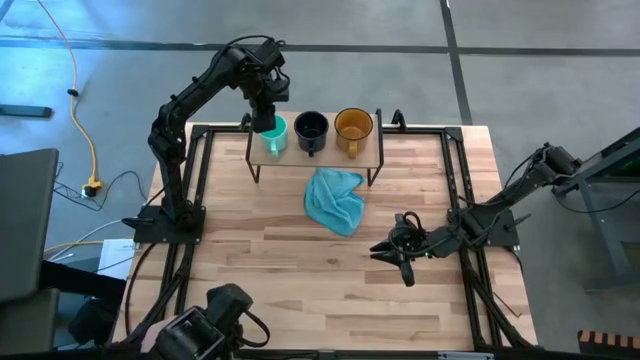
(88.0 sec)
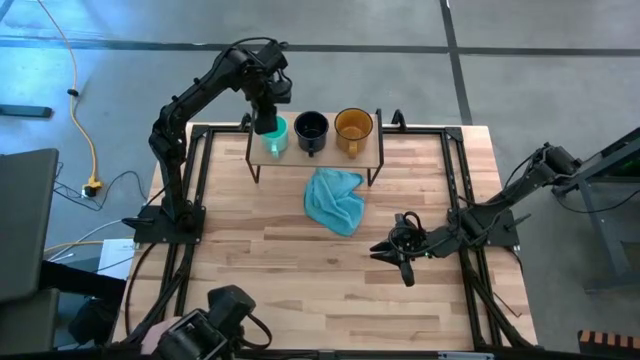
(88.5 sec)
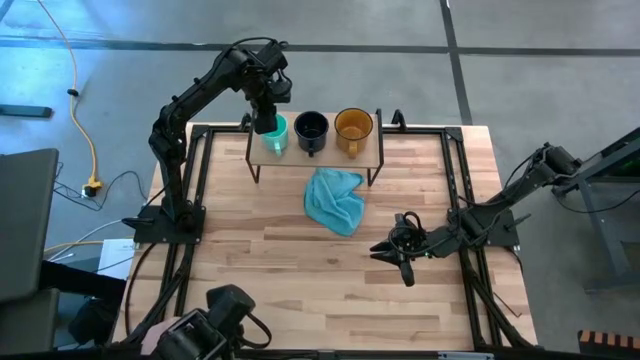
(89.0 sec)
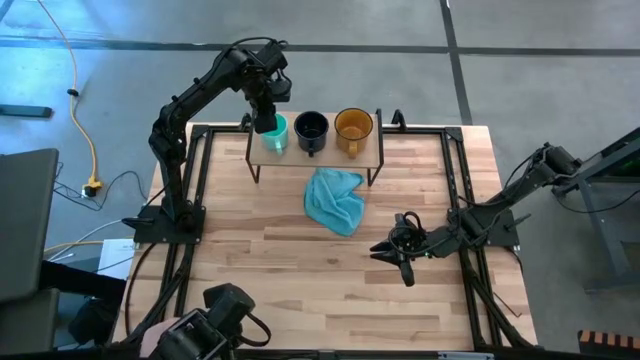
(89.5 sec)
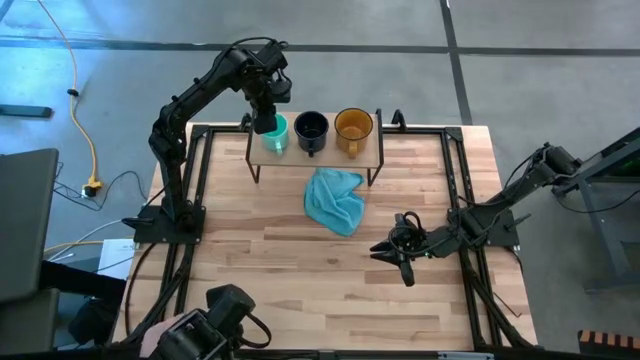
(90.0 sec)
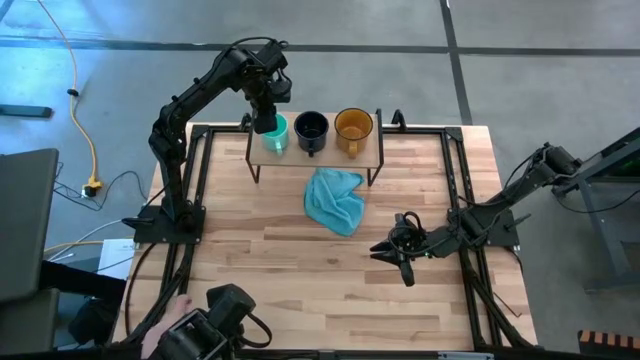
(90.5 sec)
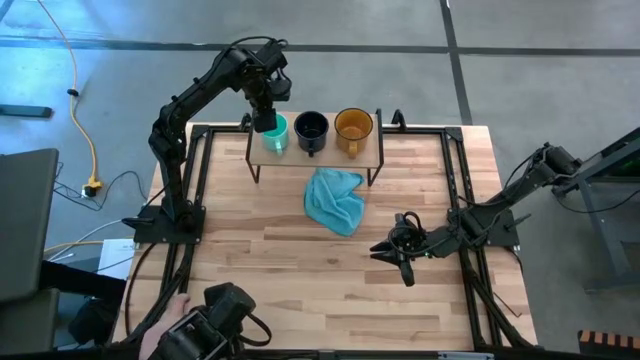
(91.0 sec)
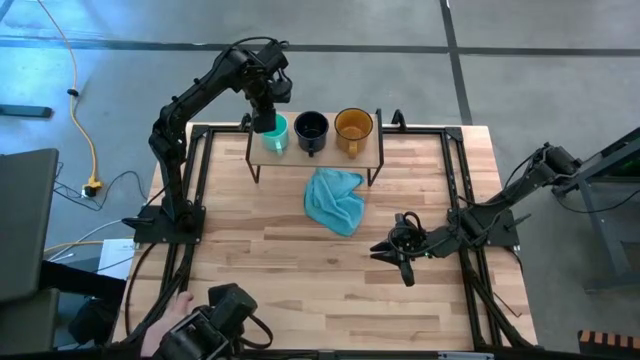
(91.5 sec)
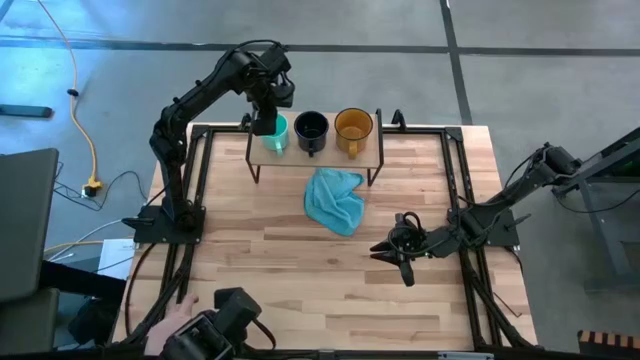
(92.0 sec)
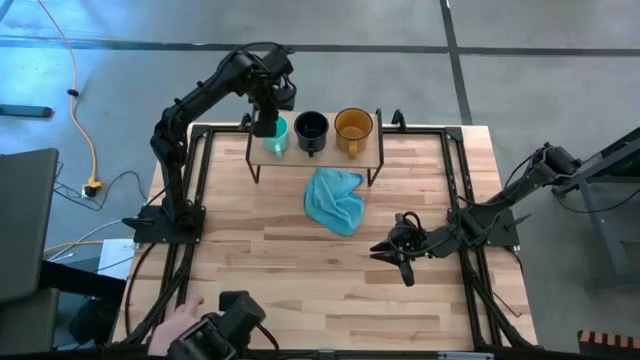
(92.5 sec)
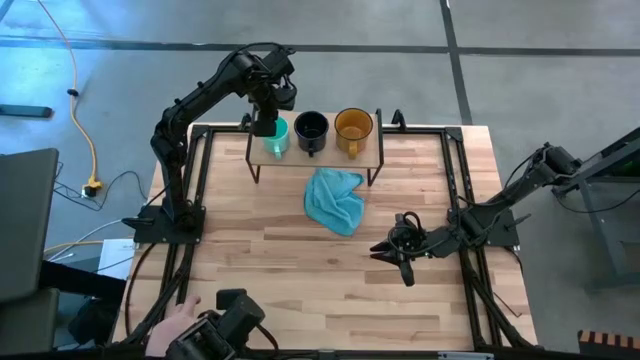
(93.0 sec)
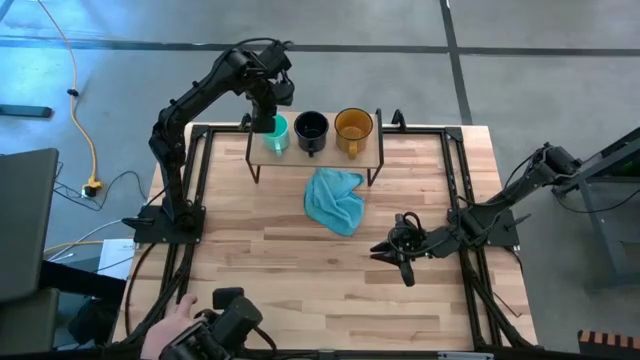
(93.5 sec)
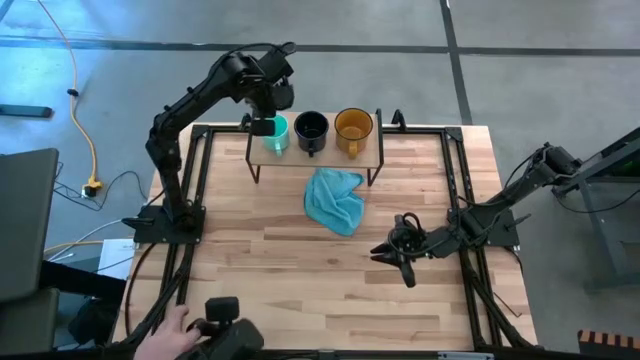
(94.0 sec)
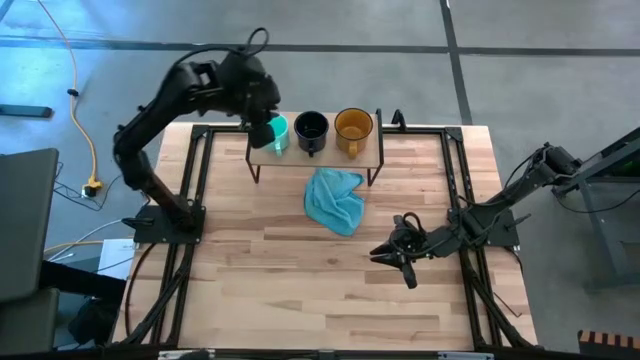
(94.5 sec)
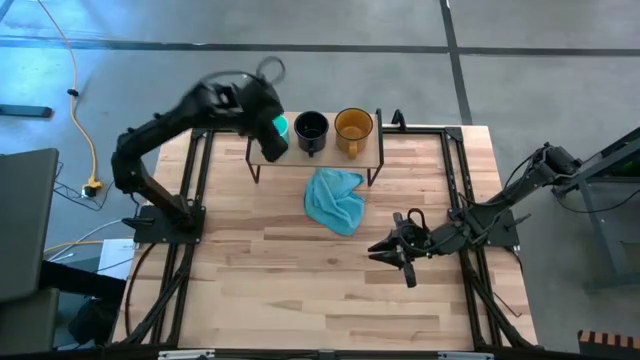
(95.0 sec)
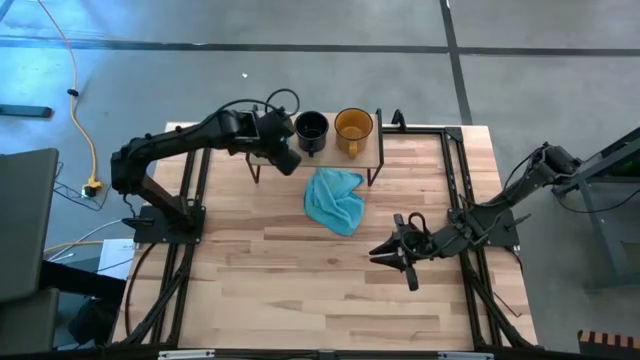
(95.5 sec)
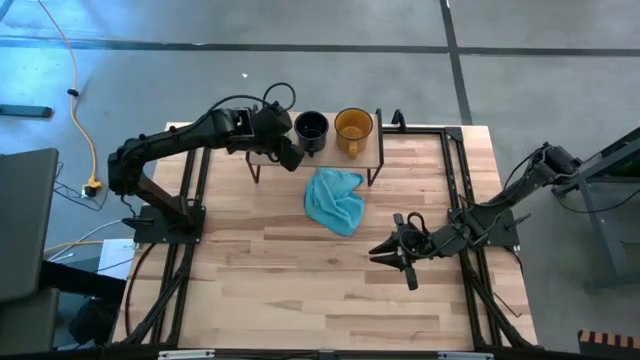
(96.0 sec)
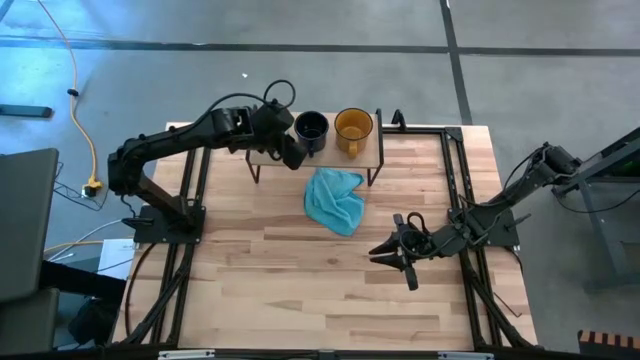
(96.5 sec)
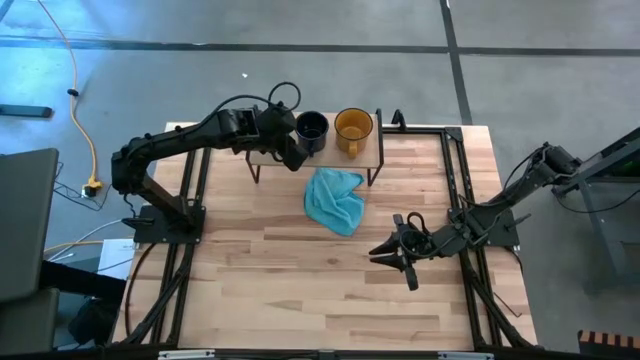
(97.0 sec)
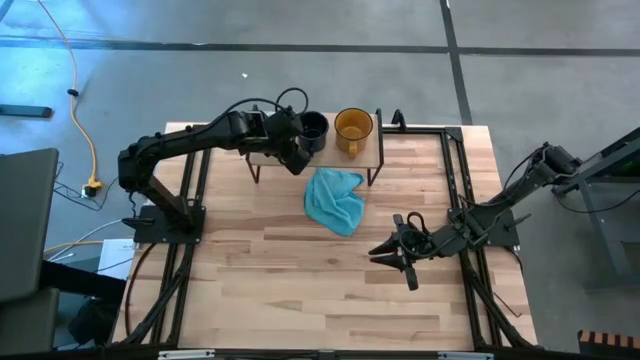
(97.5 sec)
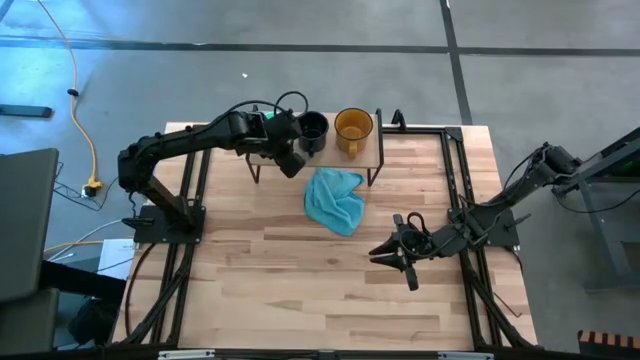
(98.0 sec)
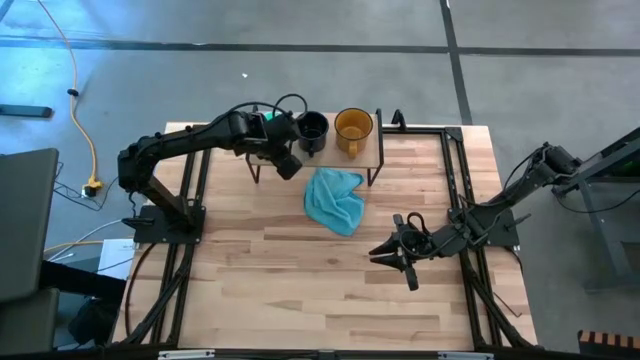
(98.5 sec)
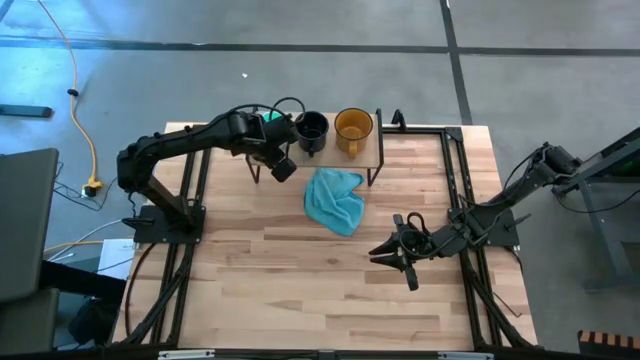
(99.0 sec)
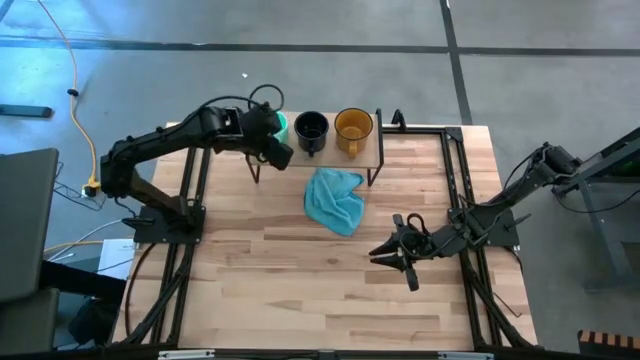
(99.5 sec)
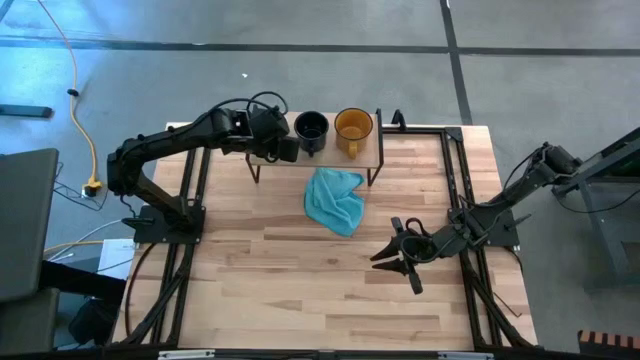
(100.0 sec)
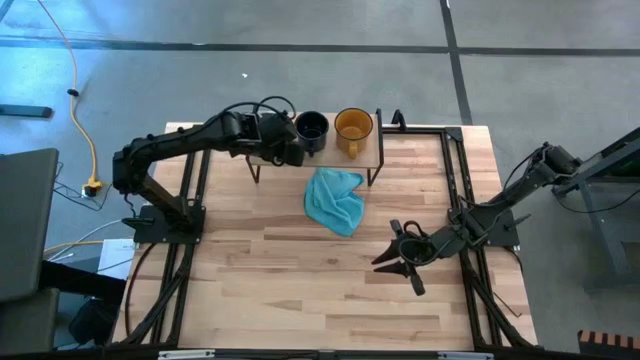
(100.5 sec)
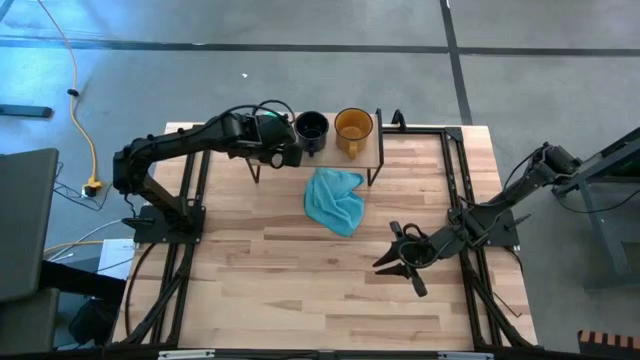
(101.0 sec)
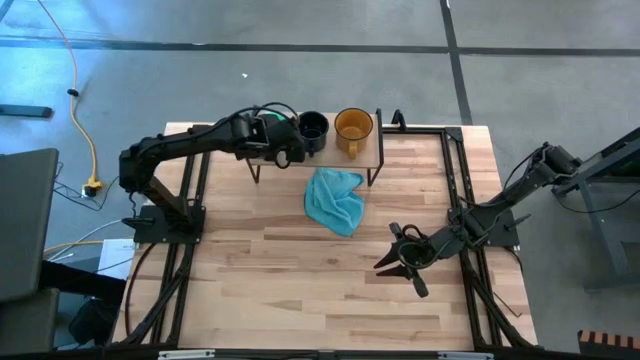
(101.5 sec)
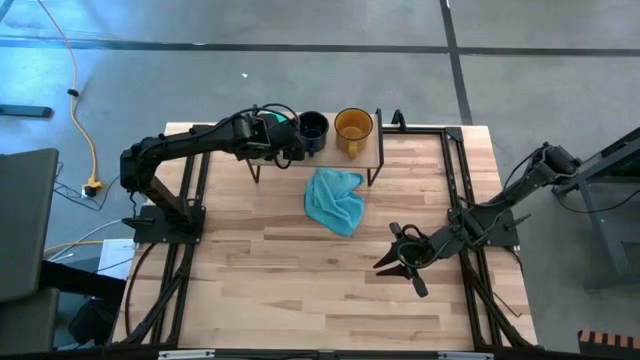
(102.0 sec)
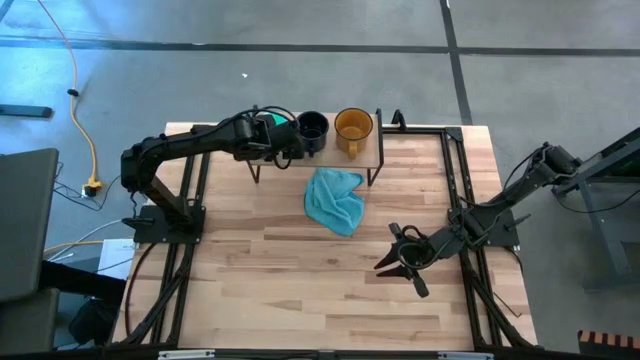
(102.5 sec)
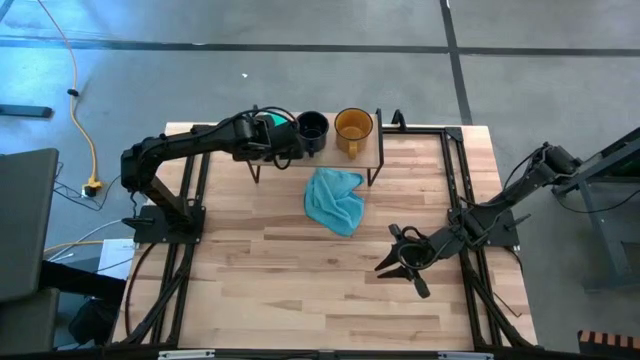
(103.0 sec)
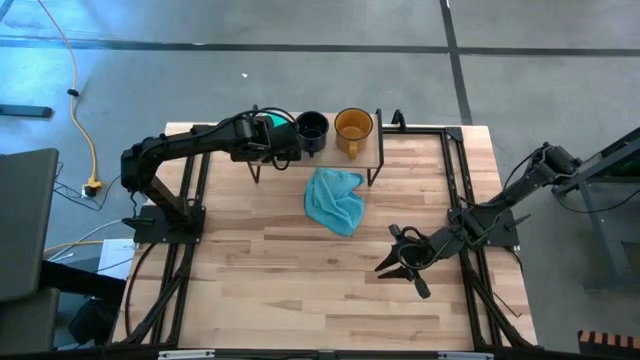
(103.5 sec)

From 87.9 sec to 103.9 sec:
Task: Stack small to large cups/mugs on shelf
Put the light blue mug on the shelf

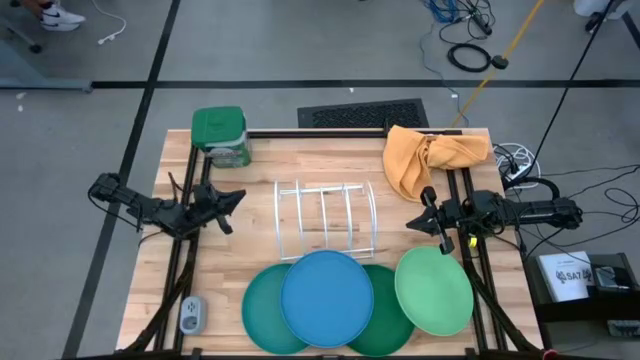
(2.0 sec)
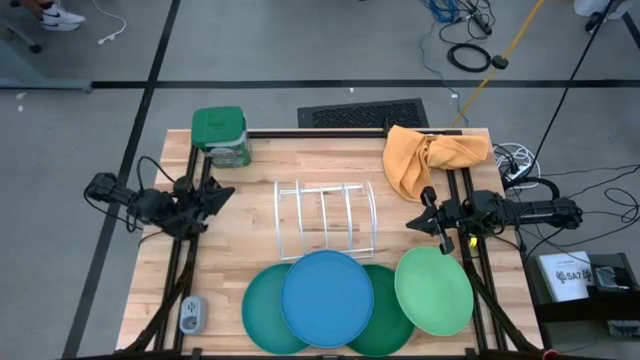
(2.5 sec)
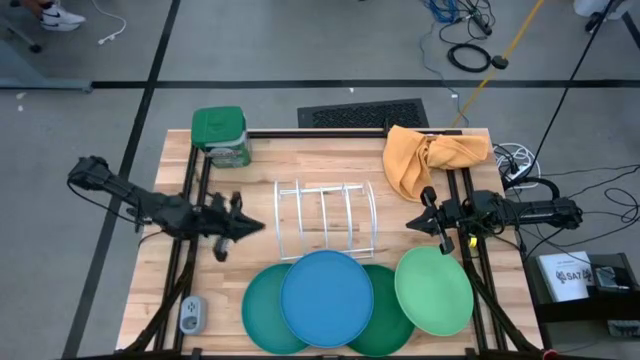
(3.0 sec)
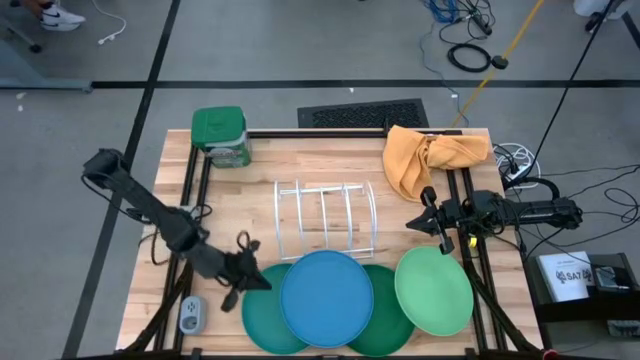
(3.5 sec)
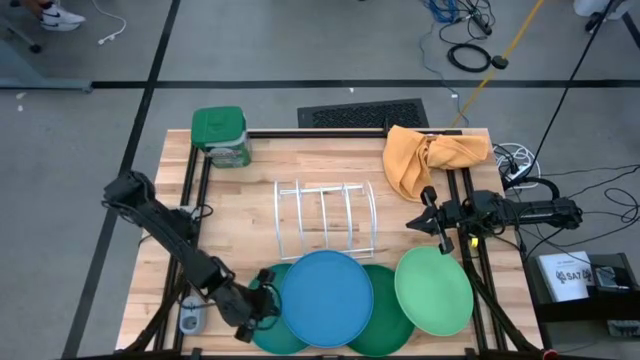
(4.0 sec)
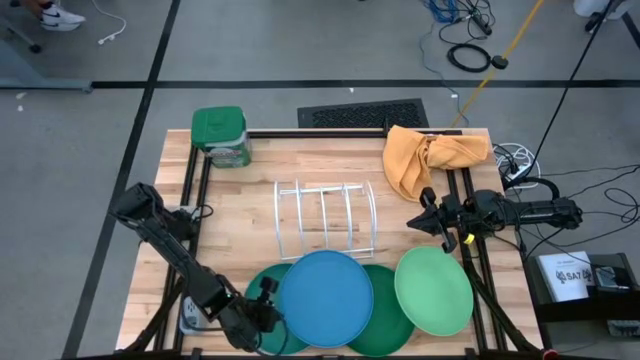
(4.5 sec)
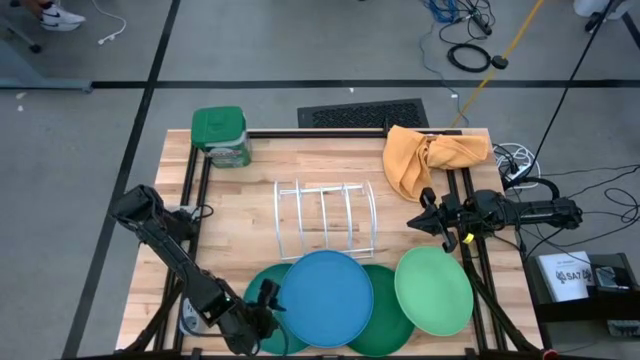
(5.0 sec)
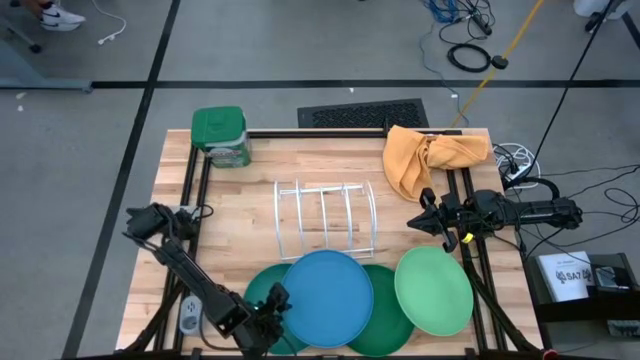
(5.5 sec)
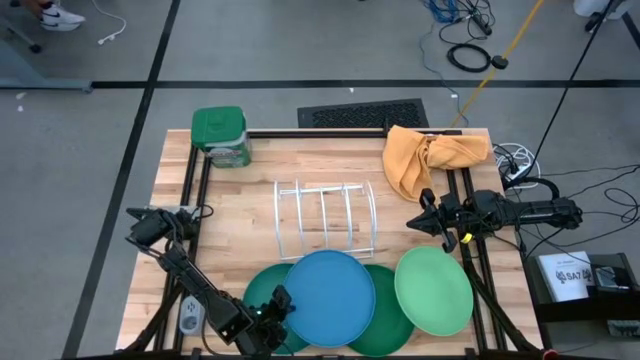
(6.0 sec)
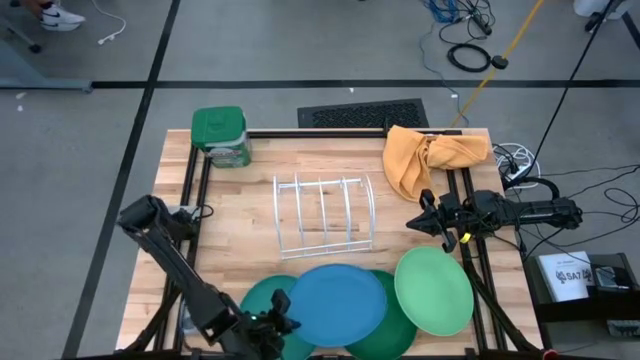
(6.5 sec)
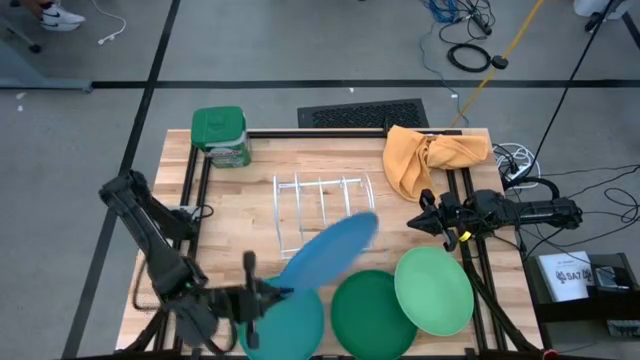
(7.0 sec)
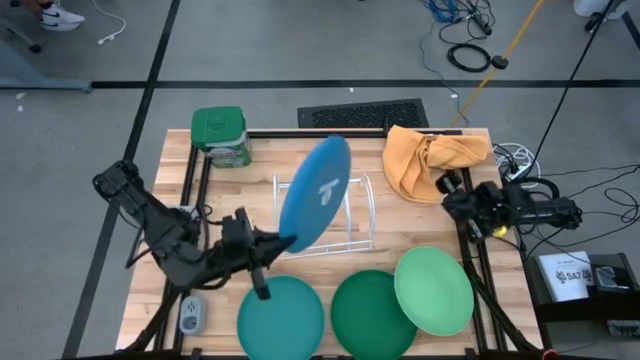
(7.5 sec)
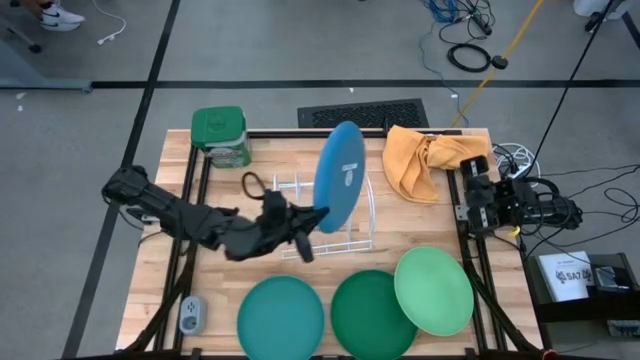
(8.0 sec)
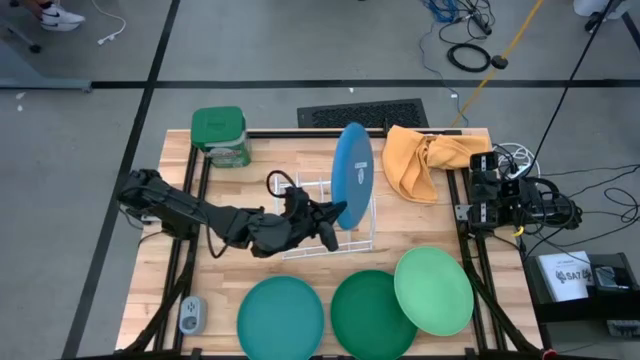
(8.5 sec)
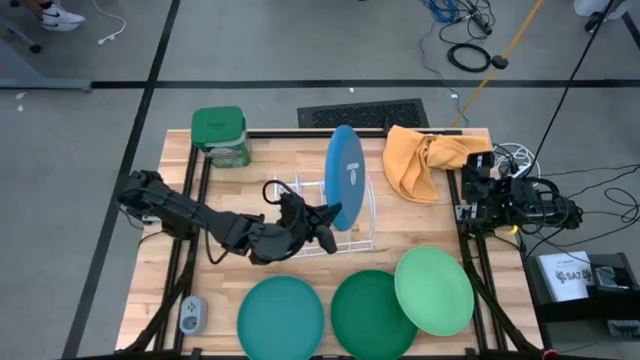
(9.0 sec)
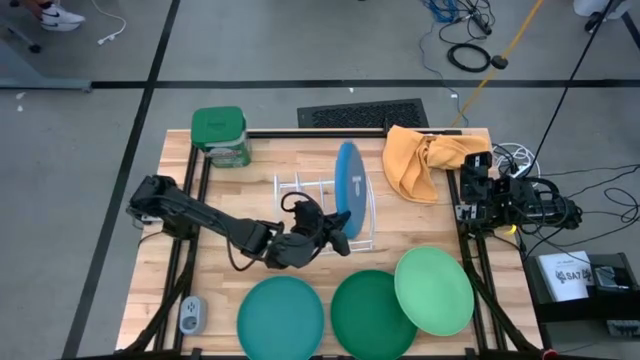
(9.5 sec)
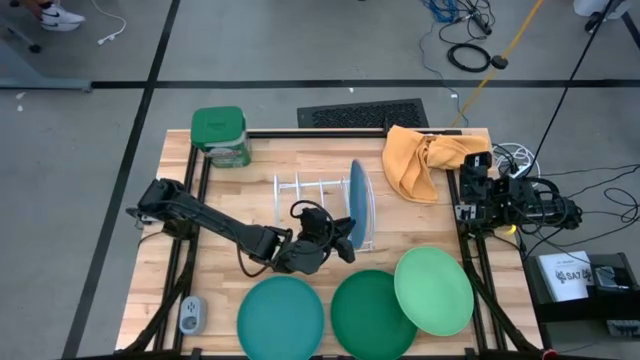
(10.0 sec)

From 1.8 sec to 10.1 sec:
Task: Sort dishes
Put the blue plate into the dish rack
